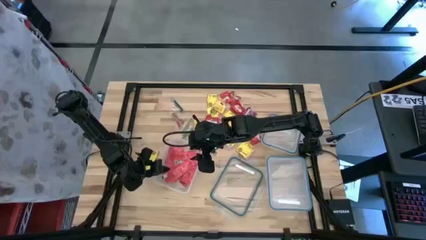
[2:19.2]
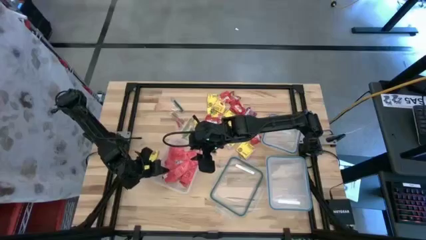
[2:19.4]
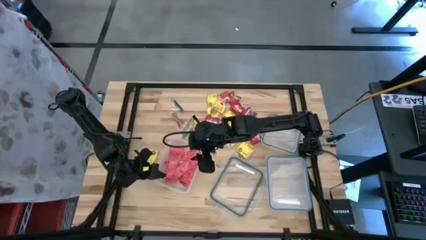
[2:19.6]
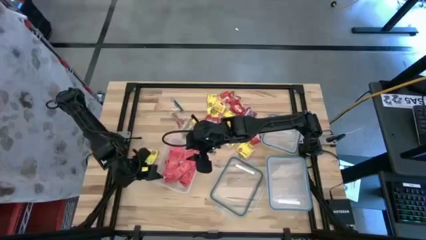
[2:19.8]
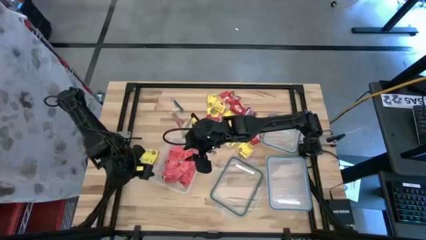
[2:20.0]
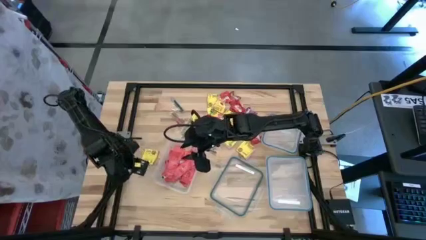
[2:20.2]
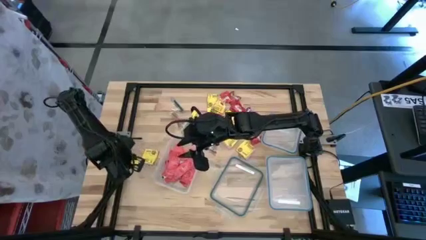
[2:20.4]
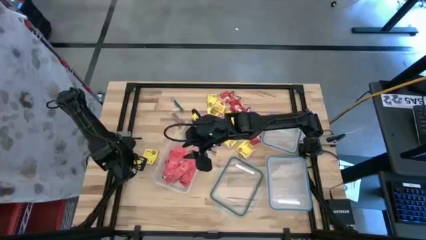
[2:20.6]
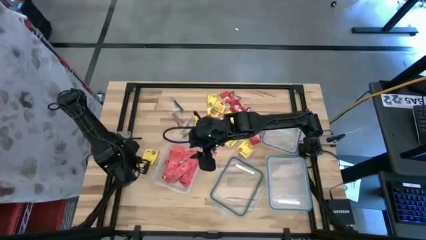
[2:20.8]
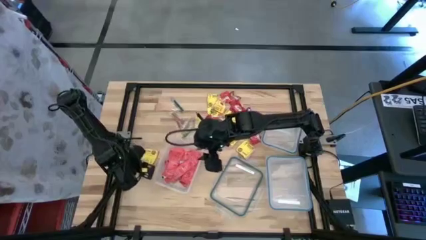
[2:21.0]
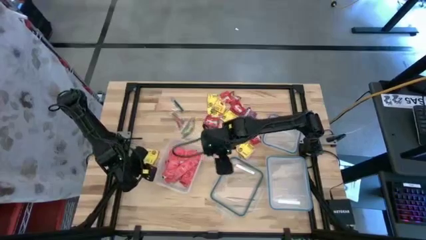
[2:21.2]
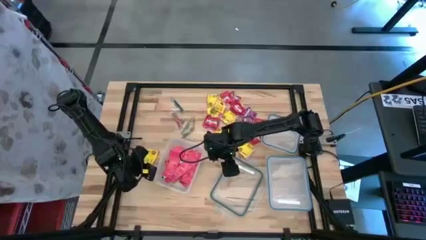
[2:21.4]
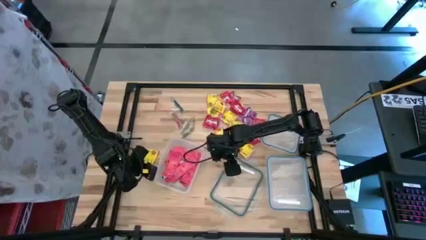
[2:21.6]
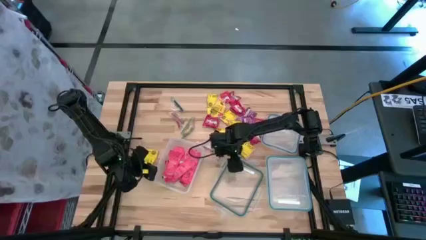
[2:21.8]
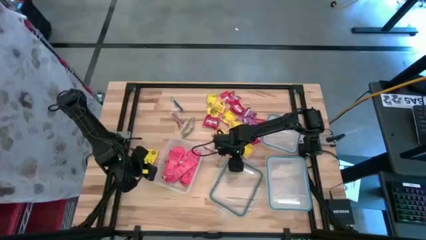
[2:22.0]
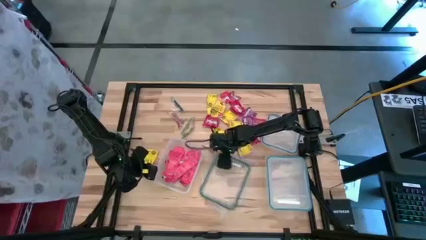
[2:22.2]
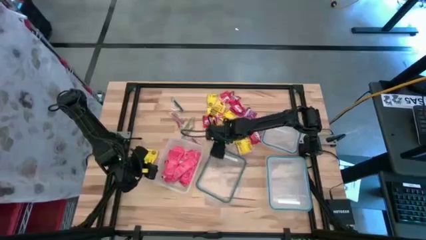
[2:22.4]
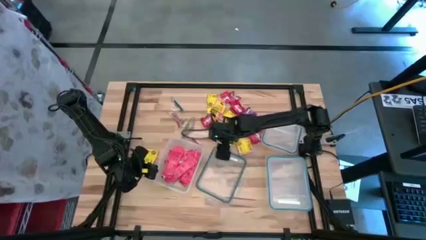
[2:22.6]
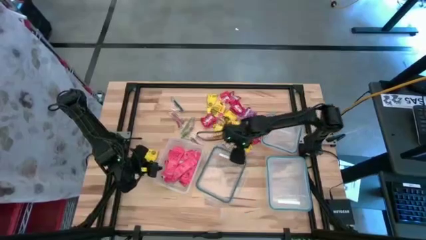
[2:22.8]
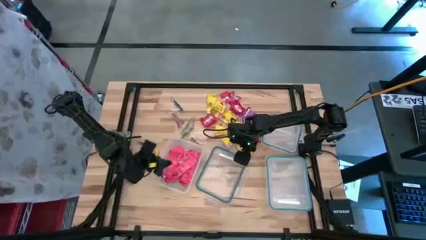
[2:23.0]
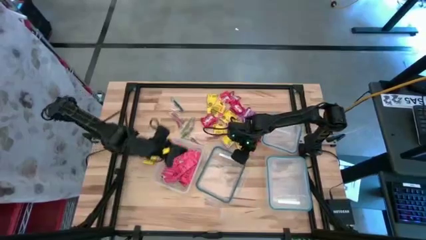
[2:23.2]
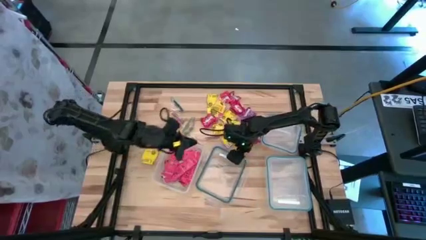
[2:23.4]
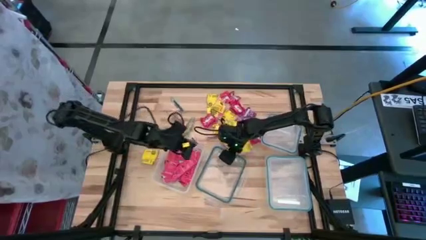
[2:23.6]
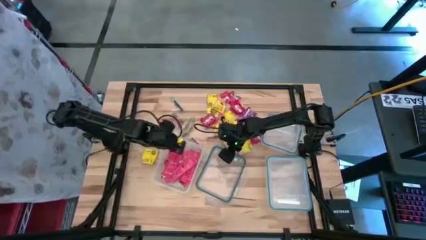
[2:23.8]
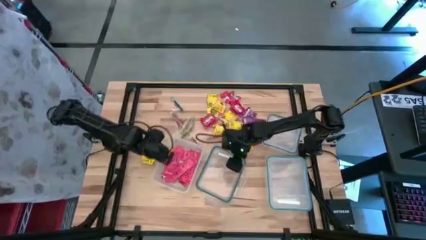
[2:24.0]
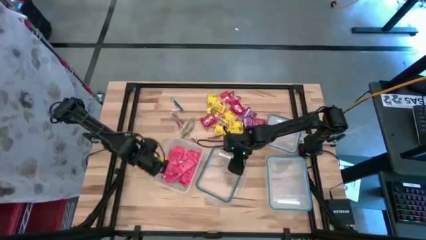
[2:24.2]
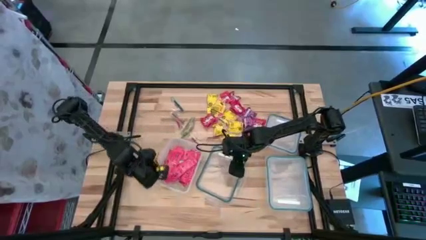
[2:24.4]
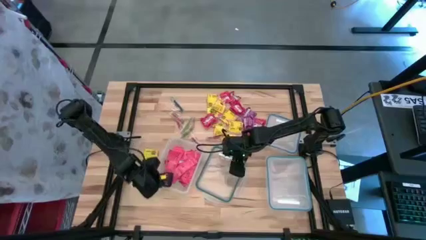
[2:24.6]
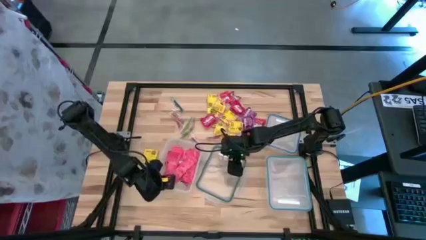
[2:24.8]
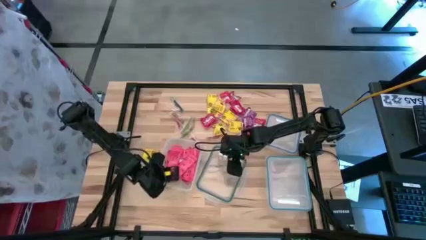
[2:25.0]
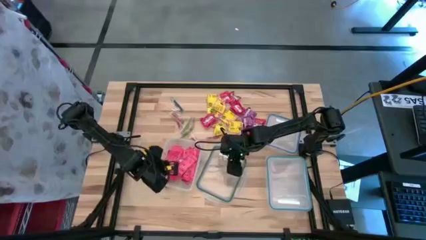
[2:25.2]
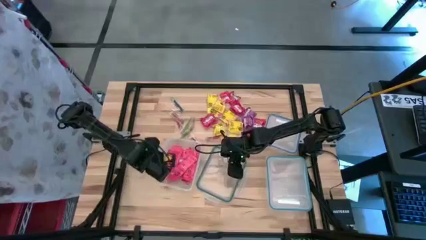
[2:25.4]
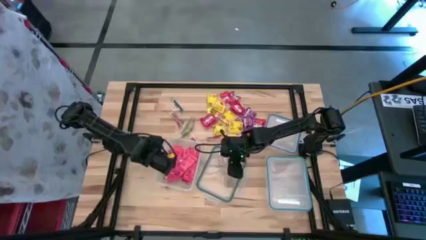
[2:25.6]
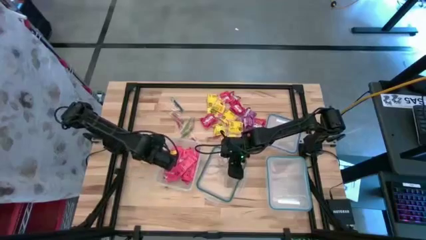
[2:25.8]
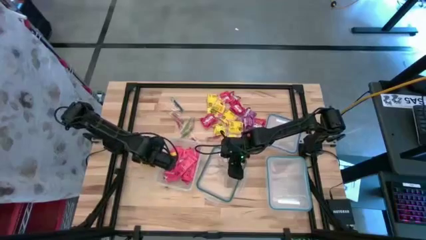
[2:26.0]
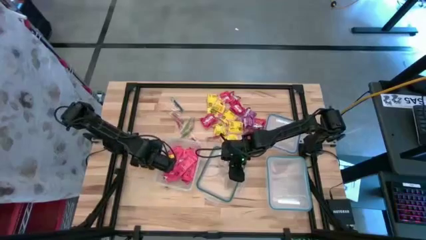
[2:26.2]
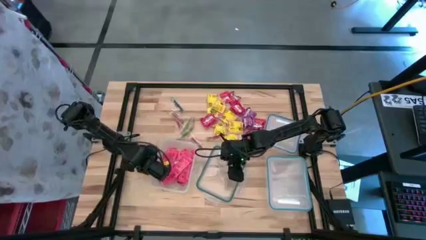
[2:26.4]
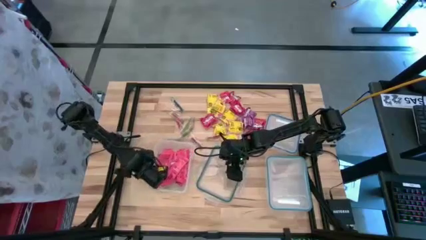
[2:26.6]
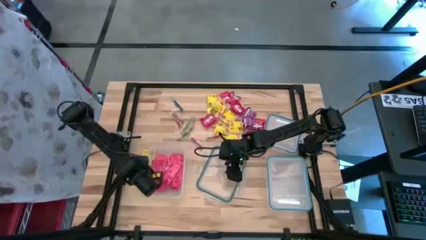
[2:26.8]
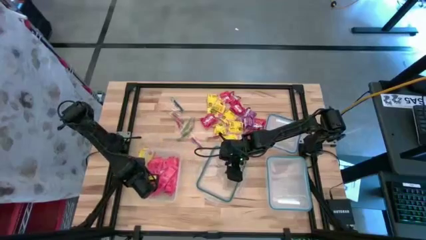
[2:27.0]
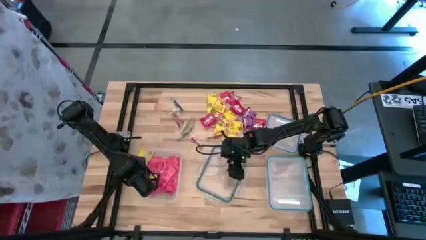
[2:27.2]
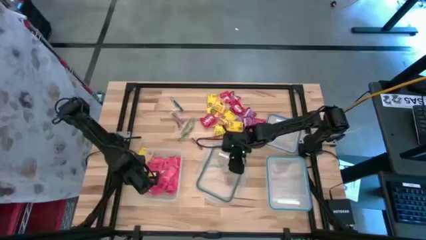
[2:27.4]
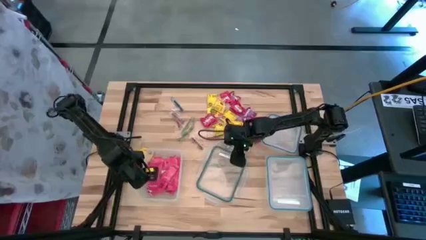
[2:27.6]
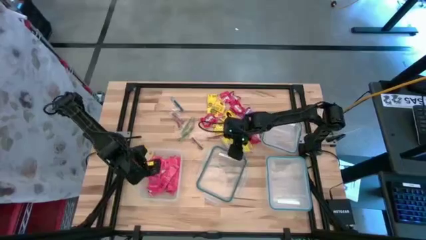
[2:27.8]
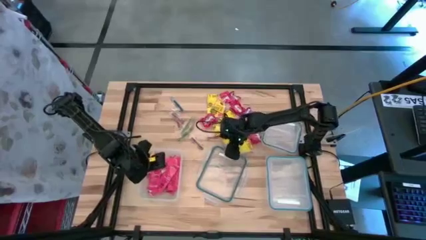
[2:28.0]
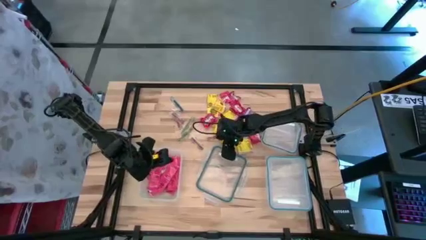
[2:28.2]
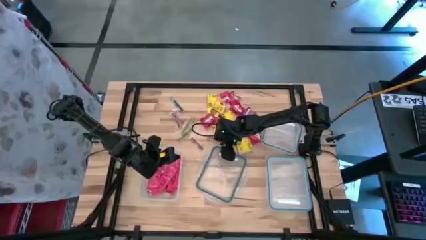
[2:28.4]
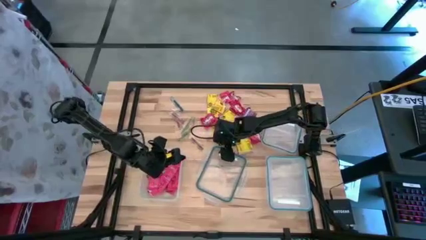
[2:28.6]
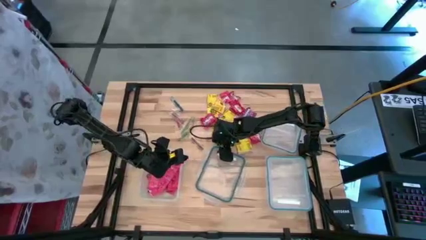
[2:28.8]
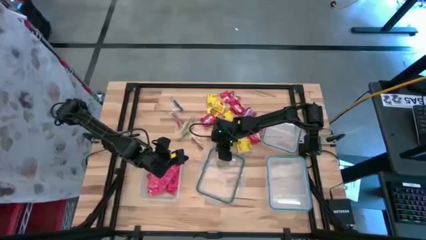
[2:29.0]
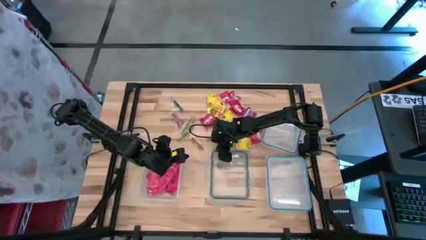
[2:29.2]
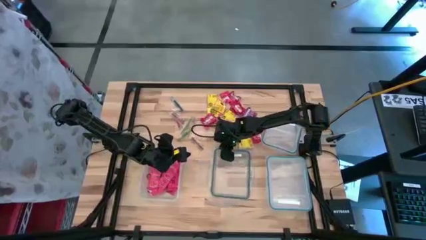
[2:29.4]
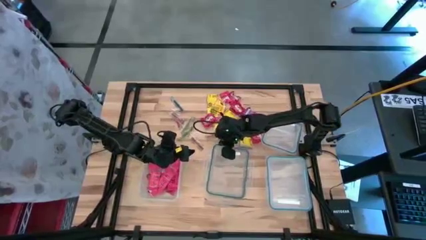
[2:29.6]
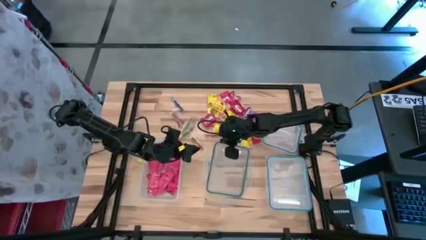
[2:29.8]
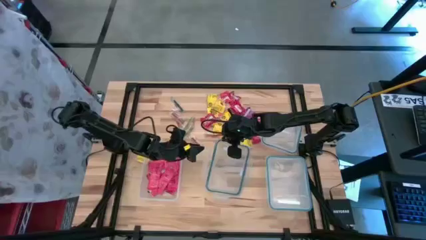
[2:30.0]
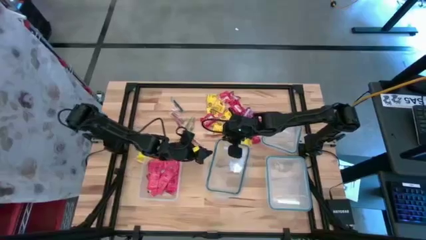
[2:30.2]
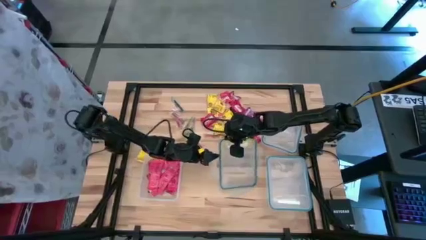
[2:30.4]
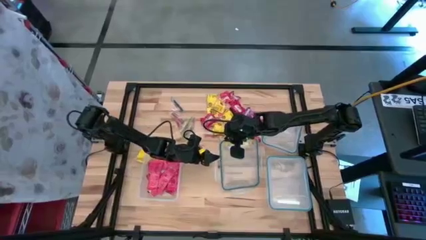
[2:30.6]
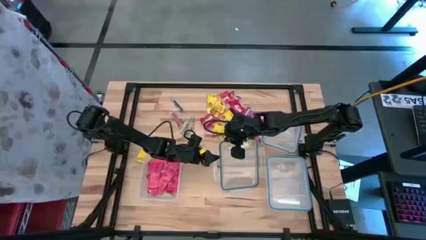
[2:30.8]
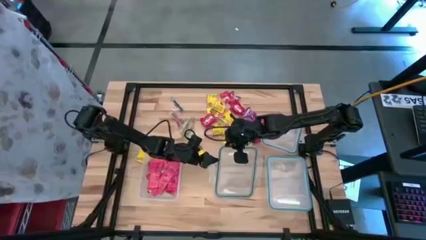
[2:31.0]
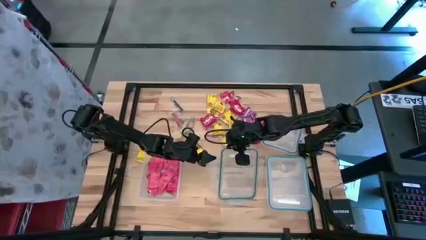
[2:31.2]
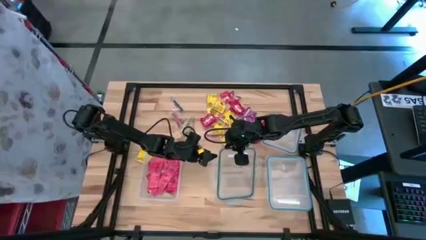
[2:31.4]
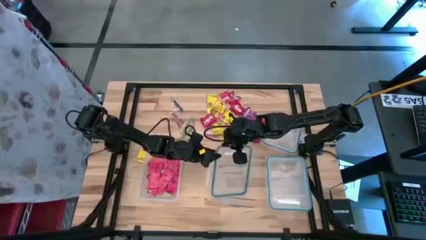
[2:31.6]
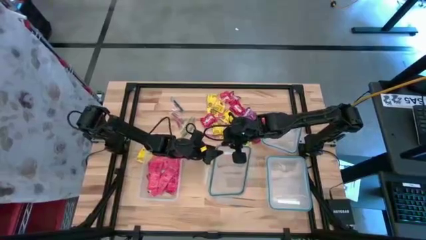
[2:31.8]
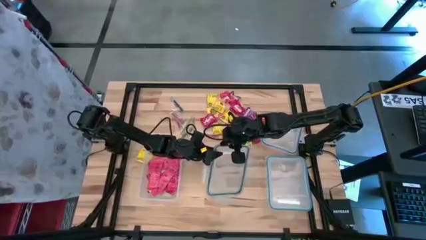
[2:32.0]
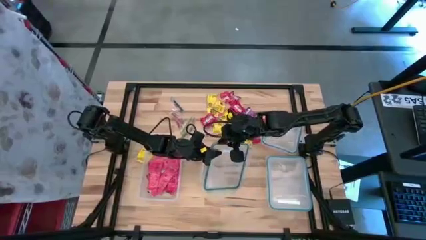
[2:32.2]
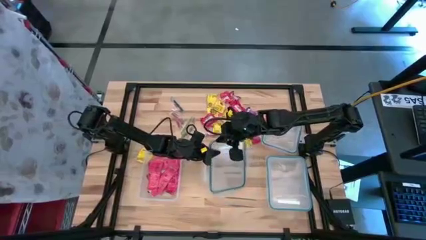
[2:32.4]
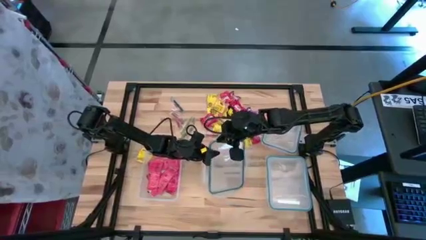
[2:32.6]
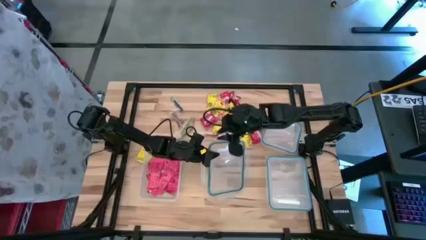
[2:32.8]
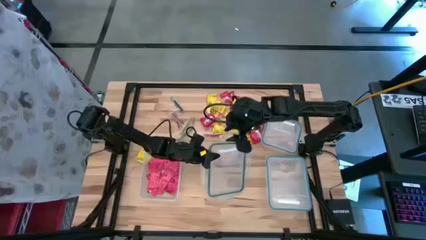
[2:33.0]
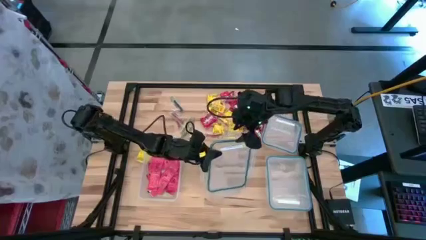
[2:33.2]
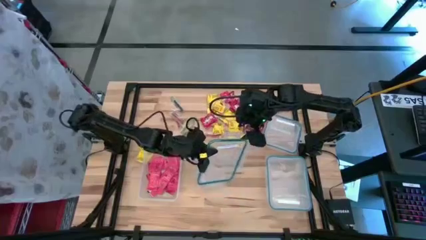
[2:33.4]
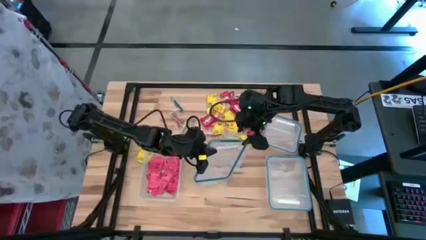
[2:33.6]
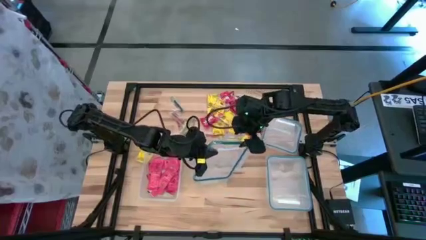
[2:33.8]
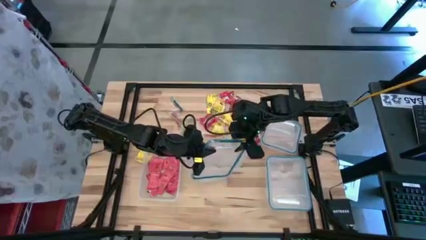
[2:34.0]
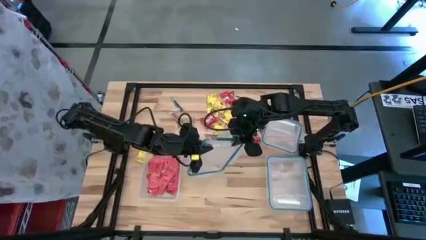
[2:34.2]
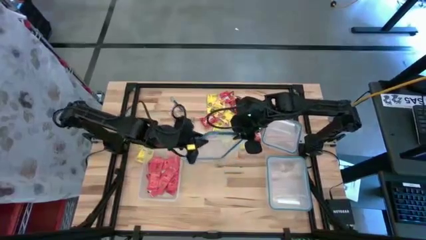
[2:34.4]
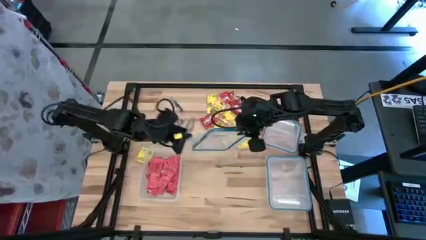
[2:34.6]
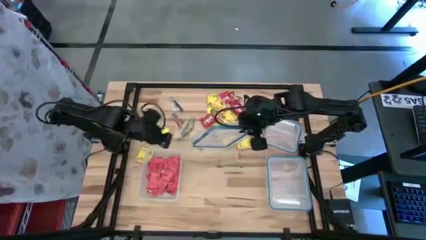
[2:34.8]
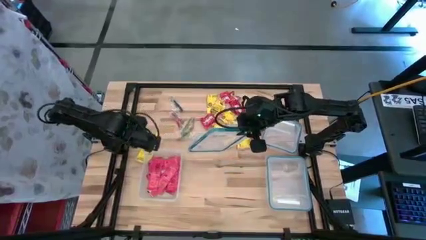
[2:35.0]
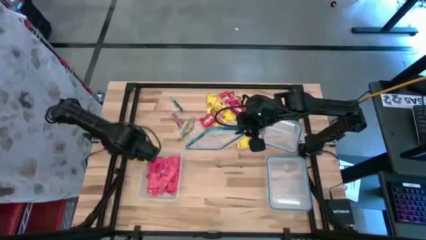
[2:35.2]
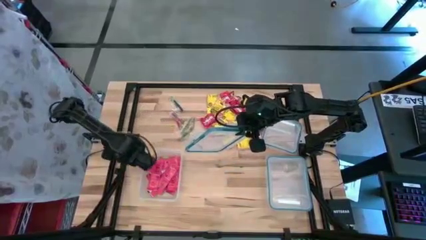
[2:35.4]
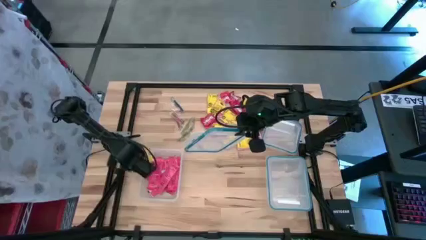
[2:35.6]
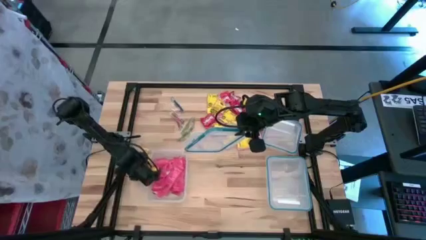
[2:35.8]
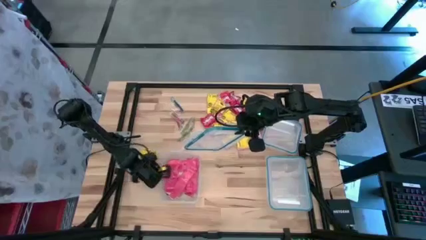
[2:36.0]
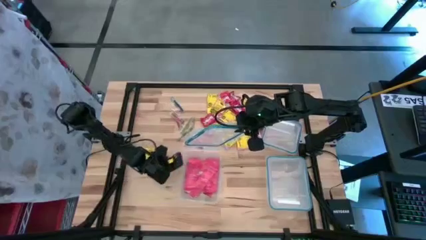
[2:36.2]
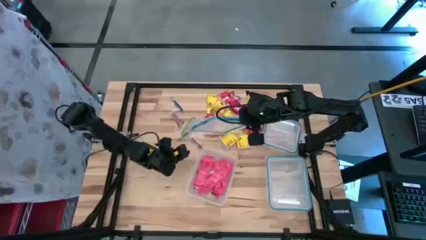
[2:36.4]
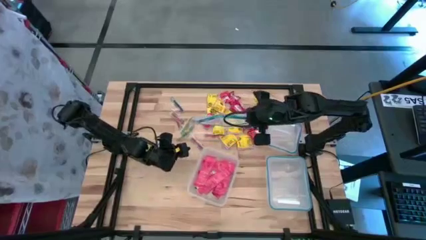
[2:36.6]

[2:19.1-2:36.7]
Task: Sort candy
Close the rectangular transparent bin
